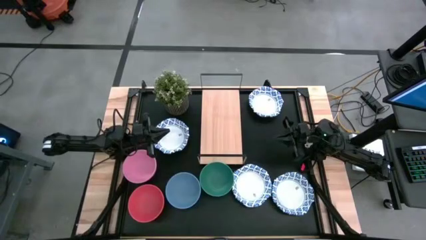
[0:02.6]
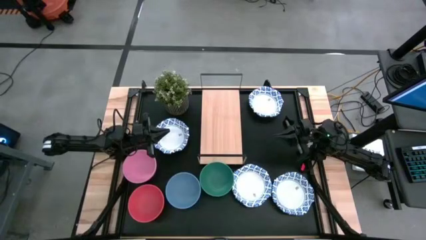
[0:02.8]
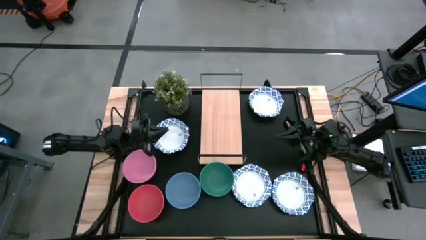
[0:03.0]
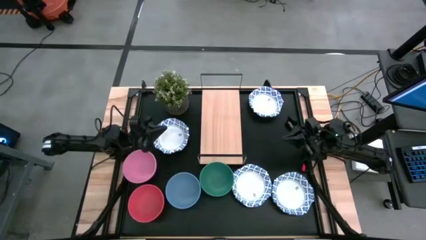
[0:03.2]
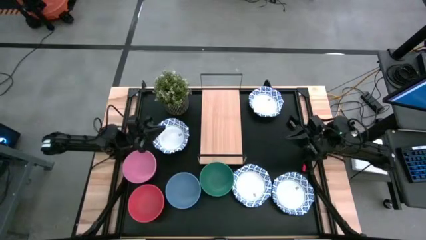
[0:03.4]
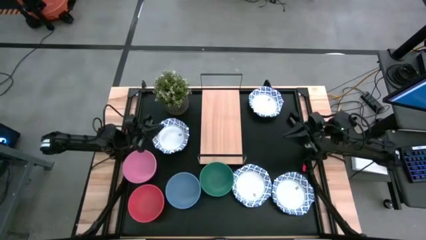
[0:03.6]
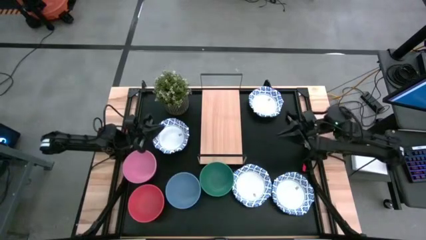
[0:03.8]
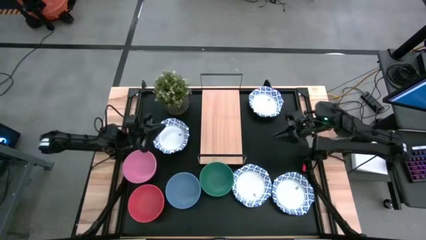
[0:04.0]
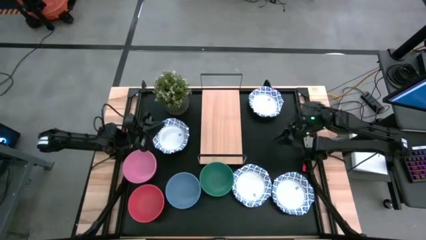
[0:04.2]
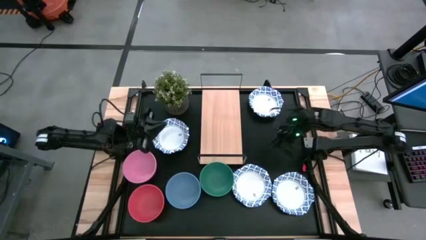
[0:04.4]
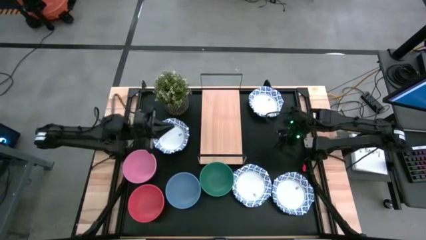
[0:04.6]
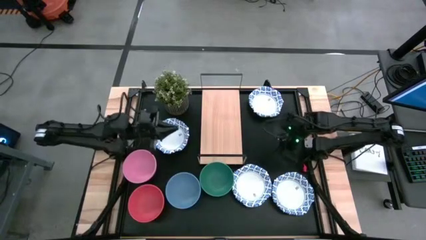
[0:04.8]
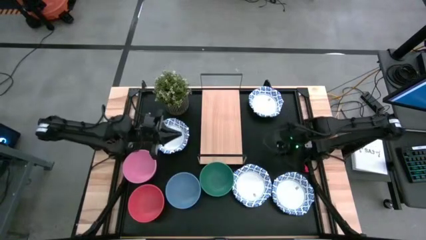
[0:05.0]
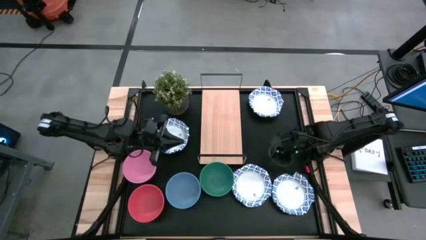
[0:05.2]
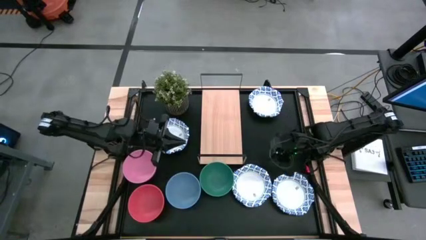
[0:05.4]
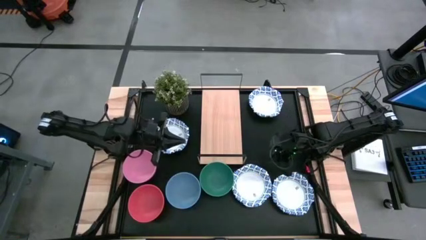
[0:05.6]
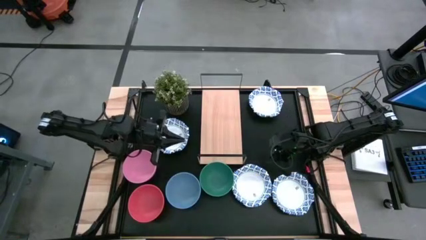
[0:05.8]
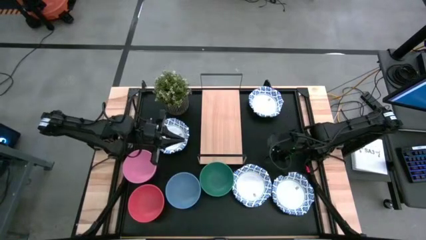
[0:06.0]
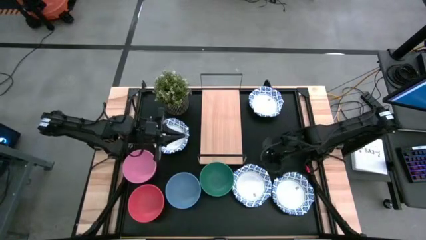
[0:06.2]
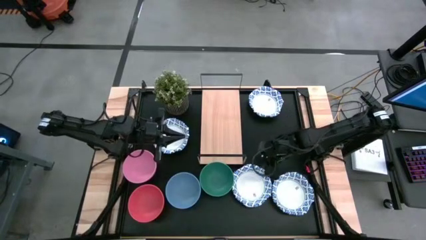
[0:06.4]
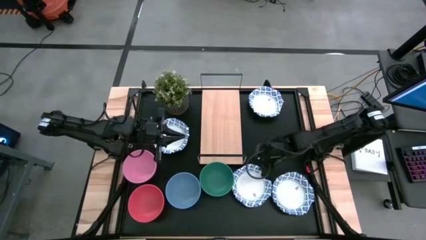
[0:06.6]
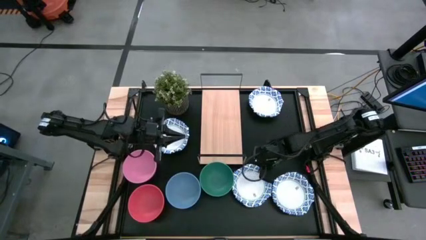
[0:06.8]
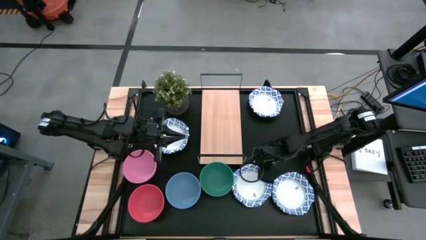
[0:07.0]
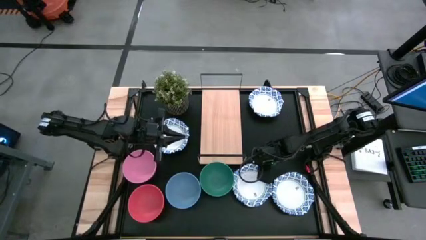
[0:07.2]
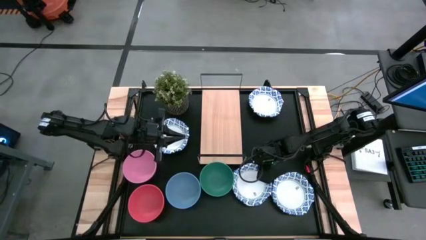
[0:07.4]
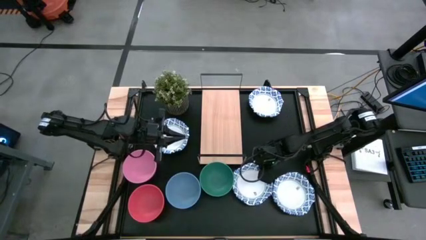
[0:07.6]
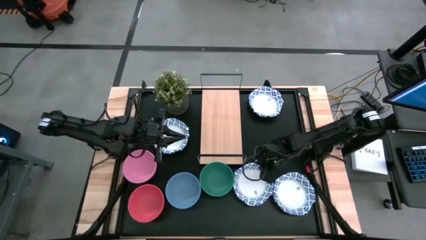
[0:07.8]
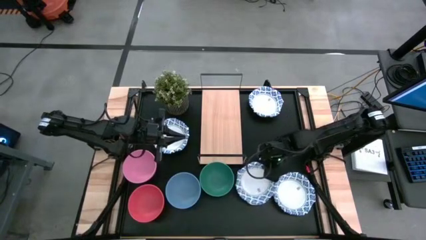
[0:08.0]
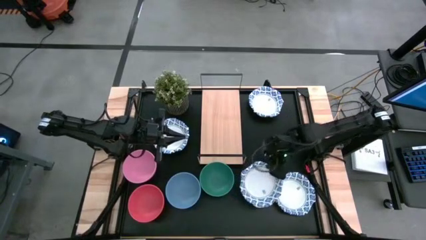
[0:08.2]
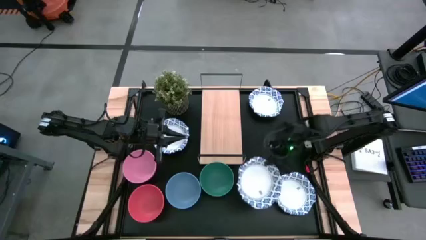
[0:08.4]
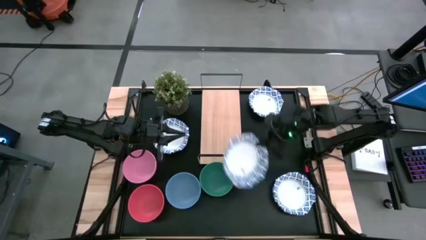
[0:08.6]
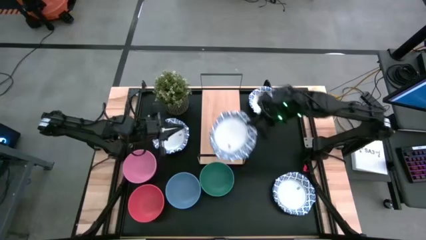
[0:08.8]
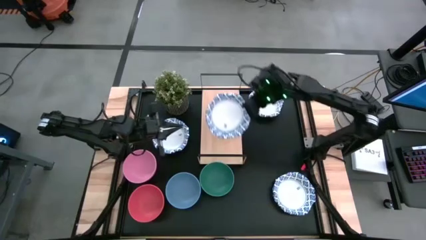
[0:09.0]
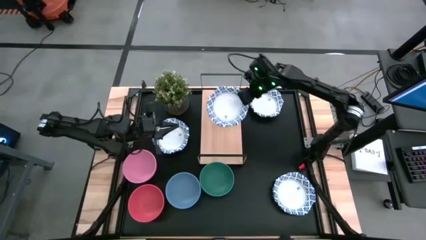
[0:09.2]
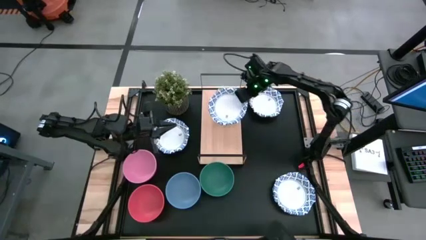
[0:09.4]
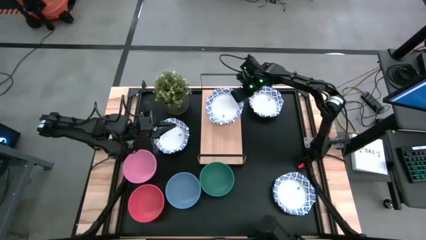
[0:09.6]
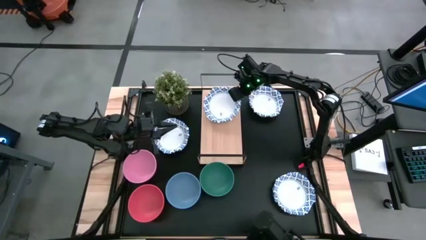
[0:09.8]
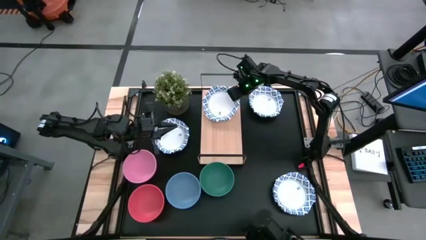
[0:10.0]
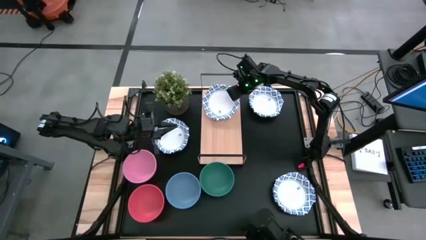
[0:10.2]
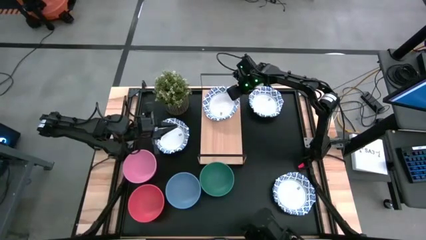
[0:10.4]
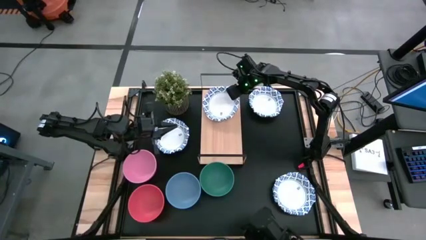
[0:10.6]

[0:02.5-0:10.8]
Task: Place and stack bowls onto a shelf
Put the white paper bowl on the shelf

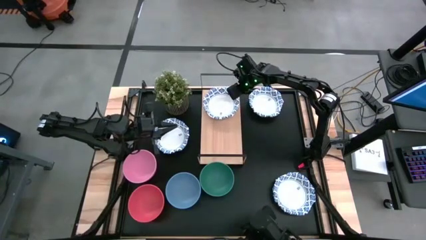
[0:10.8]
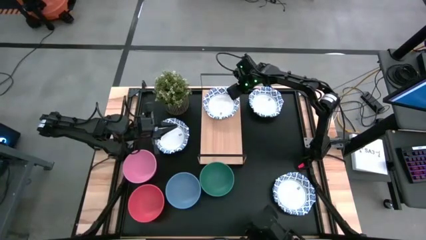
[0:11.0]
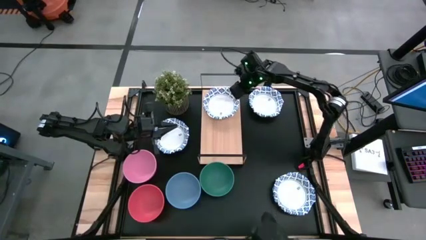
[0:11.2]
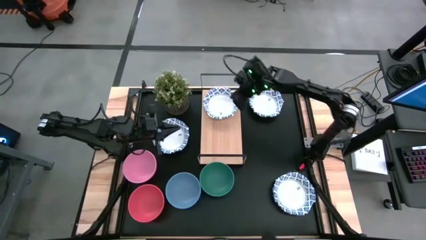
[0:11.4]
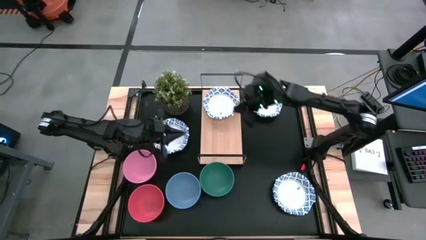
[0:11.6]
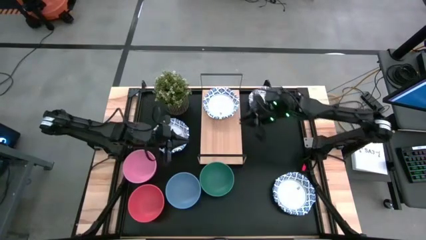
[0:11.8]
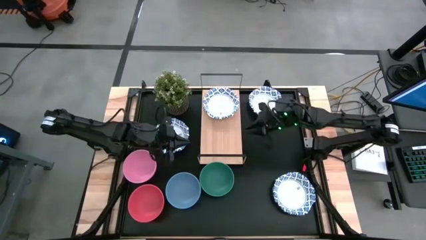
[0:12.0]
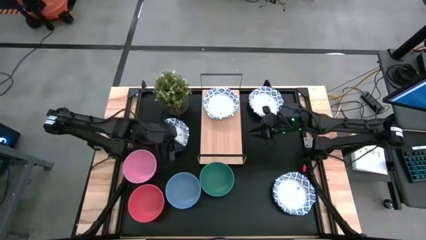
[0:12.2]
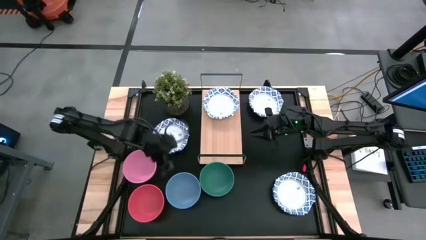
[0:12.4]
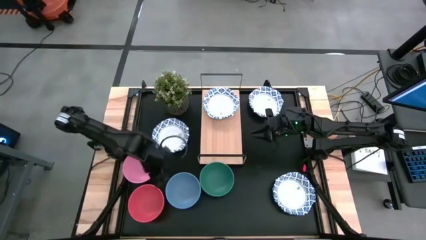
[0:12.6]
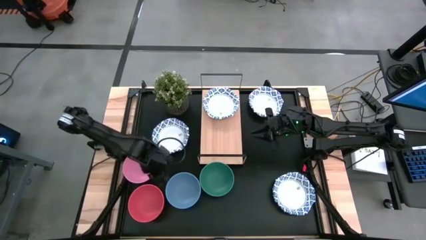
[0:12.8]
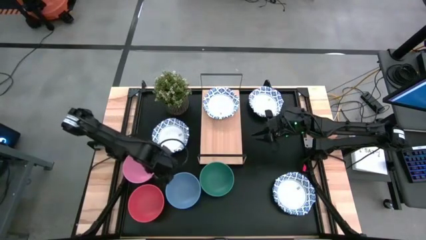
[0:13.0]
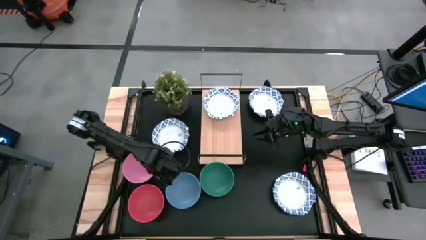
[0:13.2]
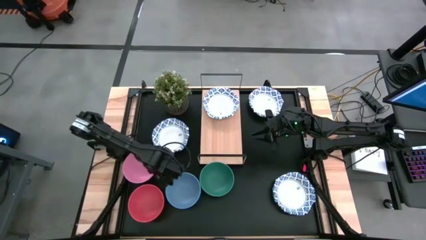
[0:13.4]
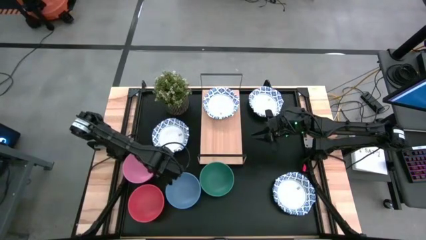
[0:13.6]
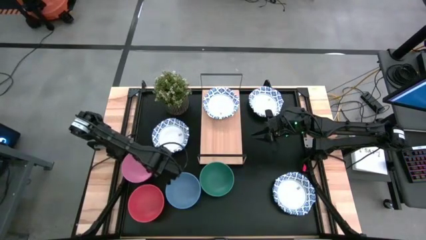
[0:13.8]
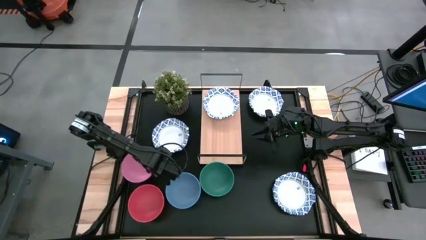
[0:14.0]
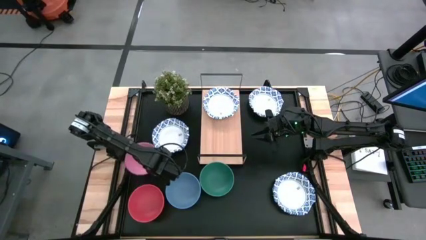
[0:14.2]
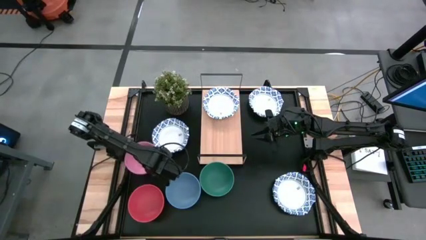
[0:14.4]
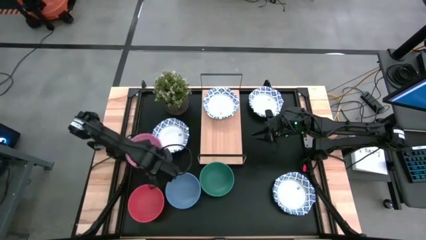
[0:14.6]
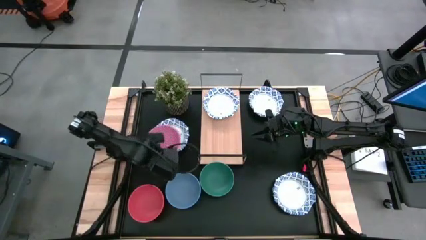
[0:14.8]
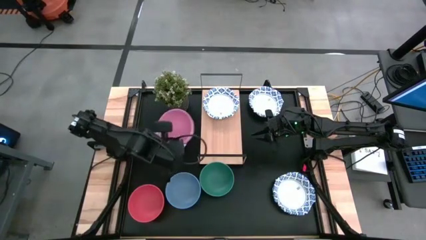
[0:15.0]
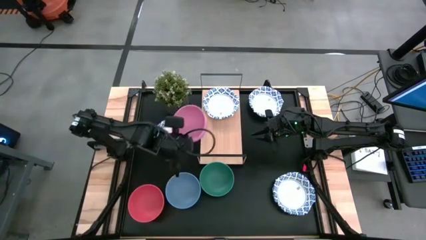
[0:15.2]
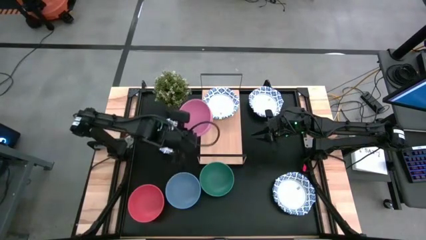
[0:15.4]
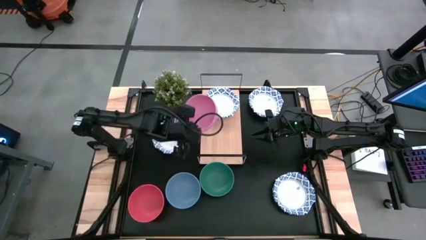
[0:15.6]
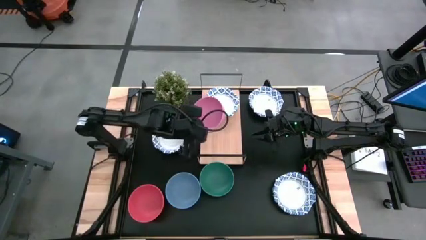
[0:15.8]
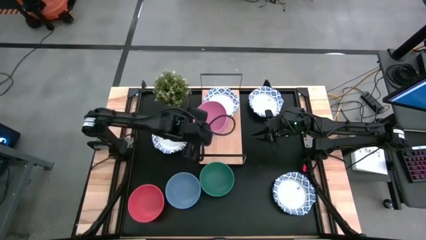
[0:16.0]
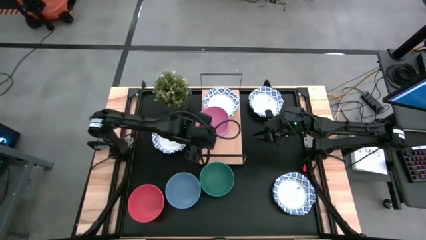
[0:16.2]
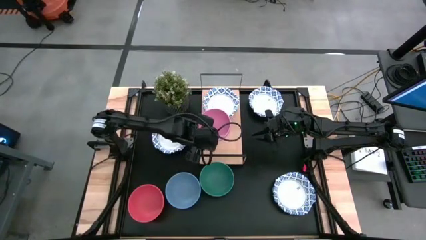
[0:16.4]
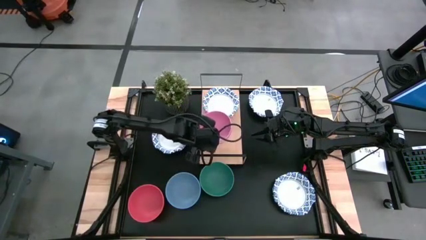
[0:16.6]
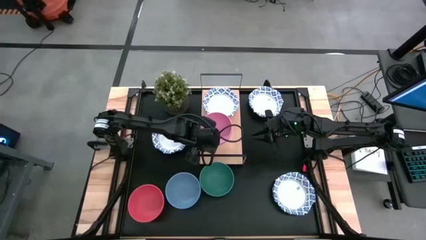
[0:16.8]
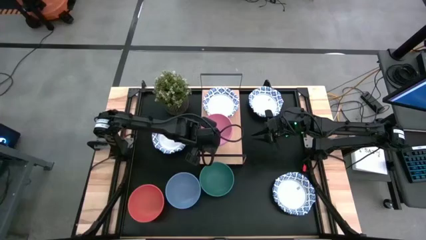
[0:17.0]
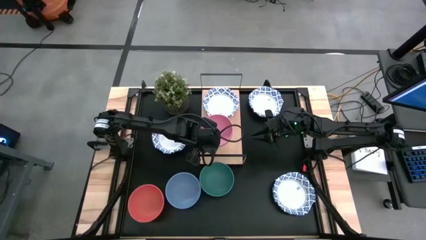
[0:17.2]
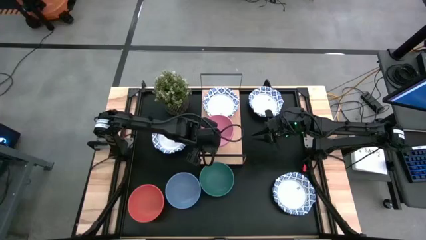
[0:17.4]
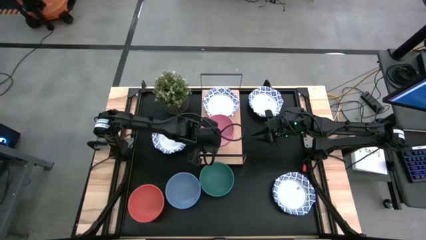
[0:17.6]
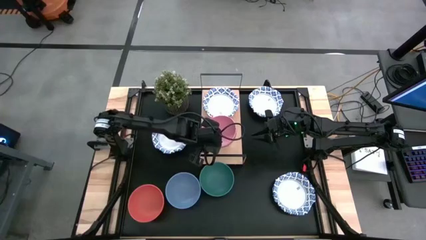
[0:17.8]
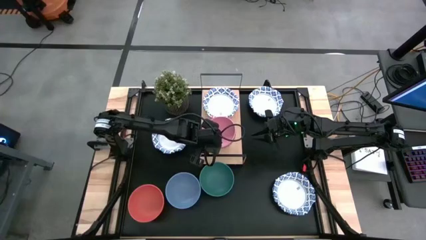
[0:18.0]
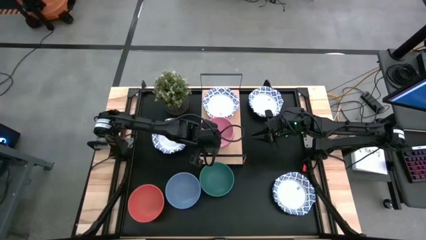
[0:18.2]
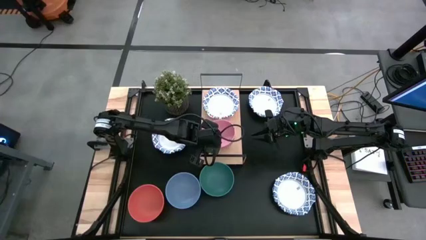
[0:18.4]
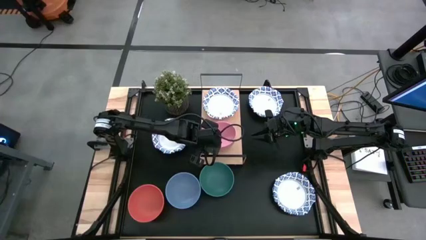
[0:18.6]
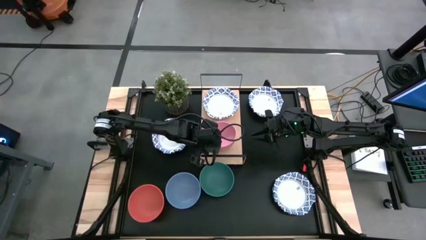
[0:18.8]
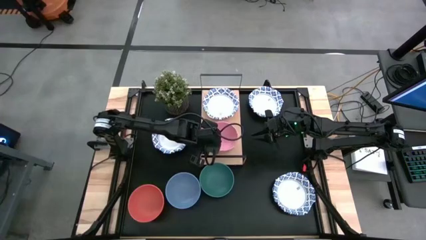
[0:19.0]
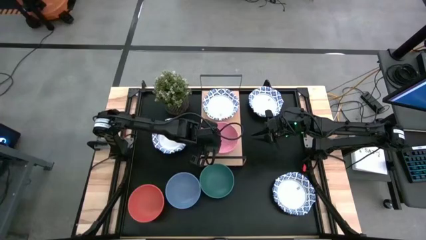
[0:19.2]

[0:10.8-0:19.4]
Put the plastic pink bowl on the shelf
